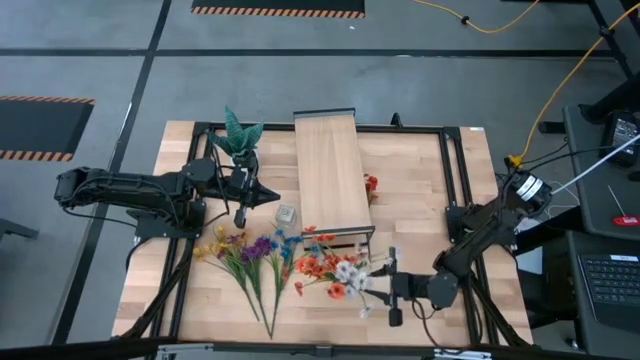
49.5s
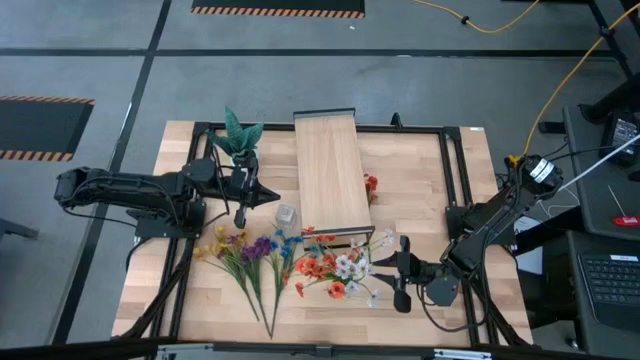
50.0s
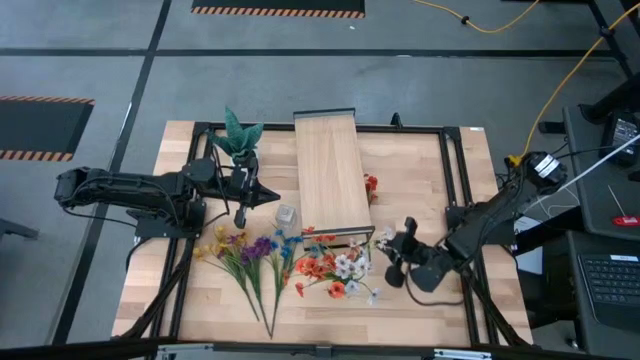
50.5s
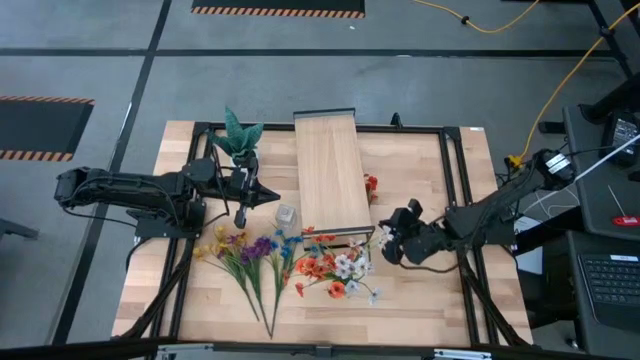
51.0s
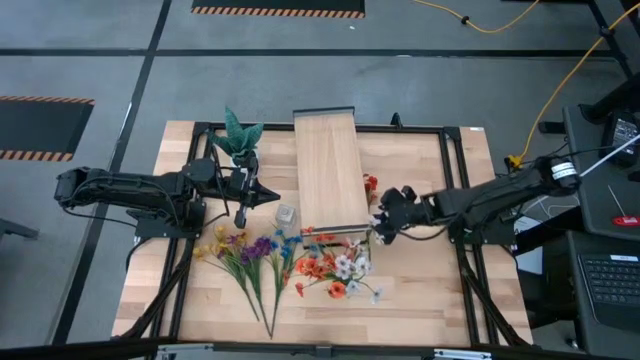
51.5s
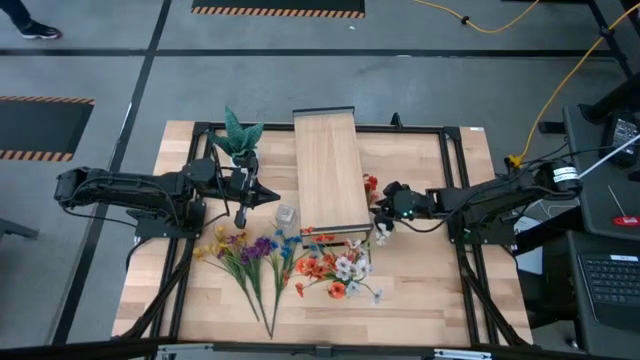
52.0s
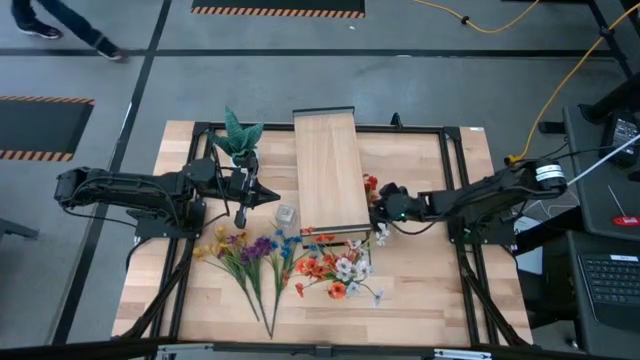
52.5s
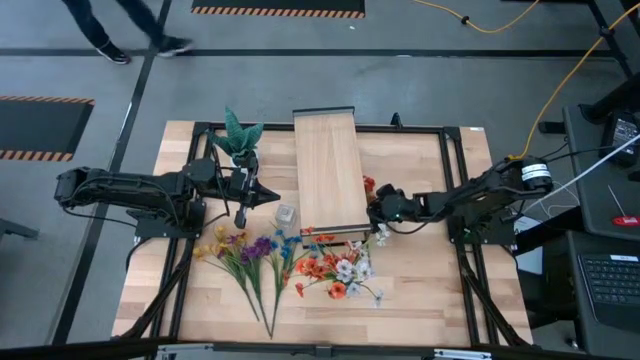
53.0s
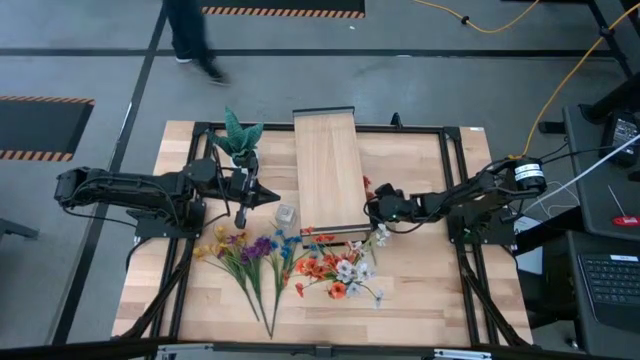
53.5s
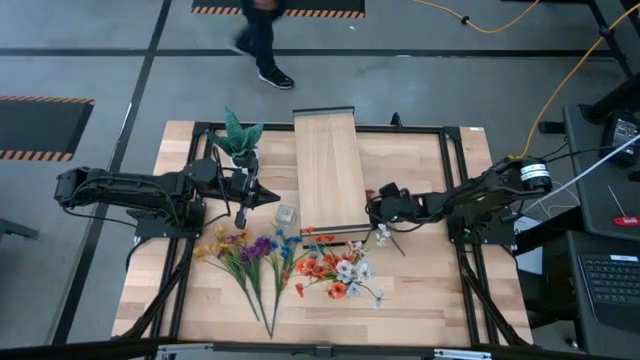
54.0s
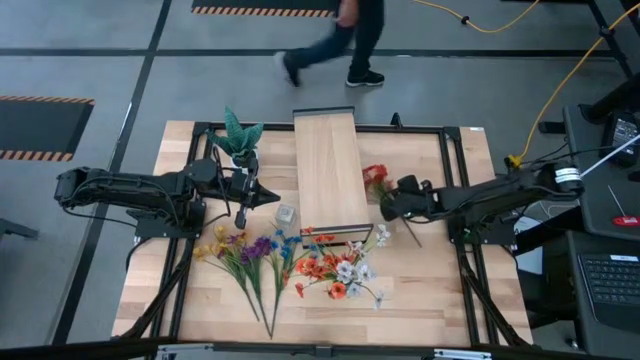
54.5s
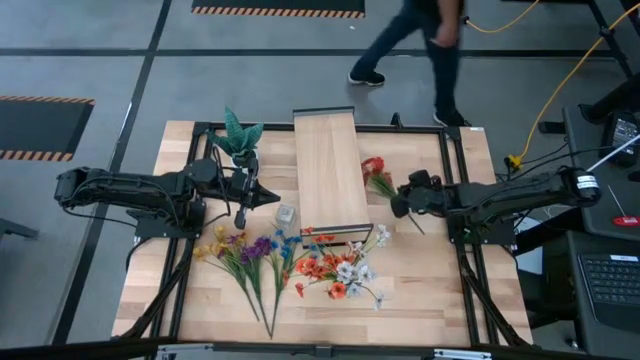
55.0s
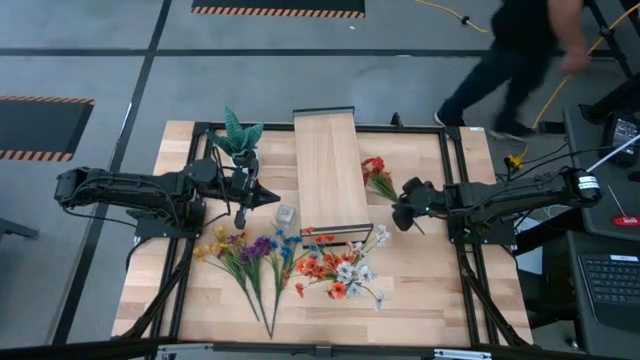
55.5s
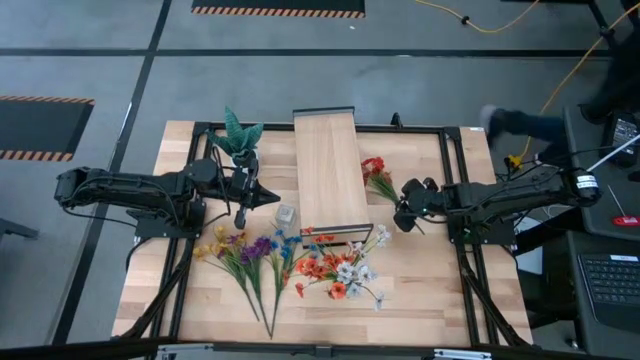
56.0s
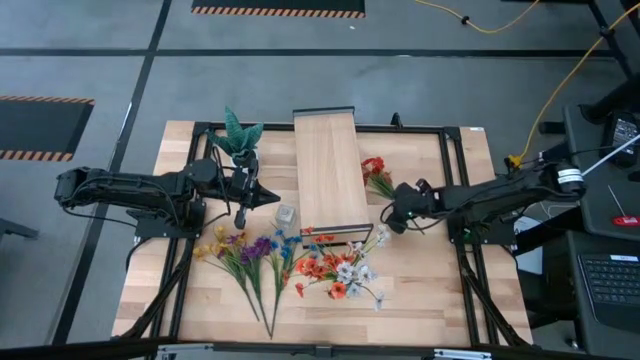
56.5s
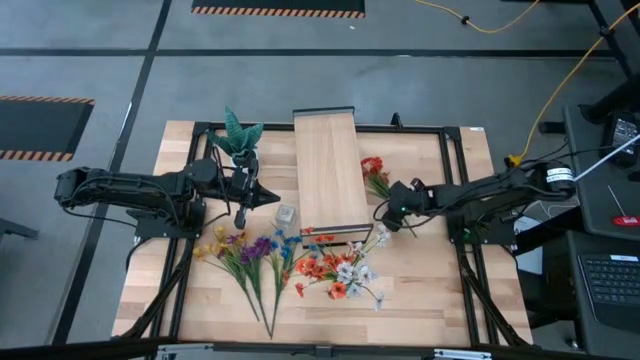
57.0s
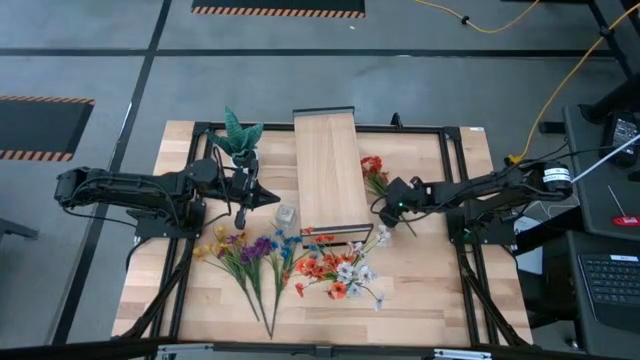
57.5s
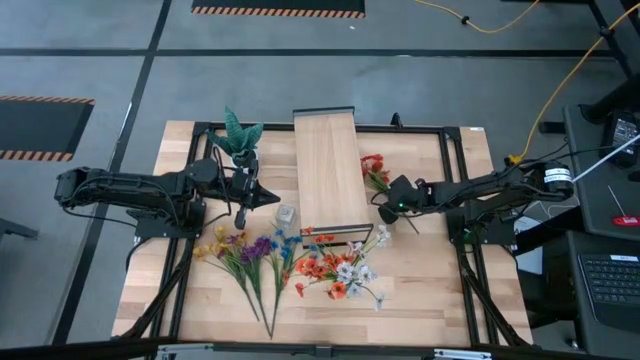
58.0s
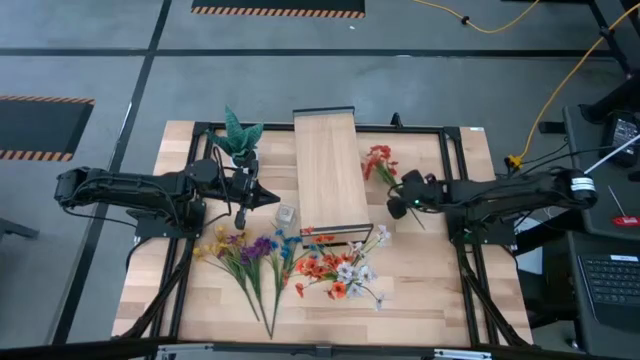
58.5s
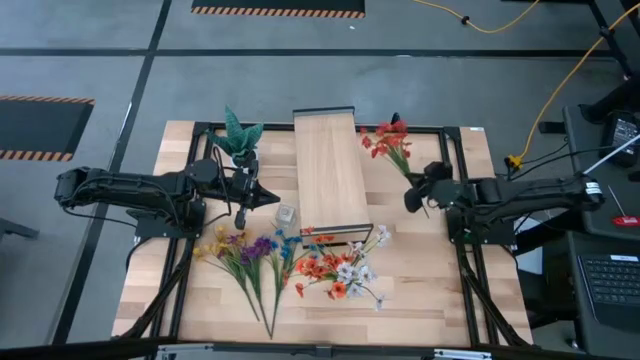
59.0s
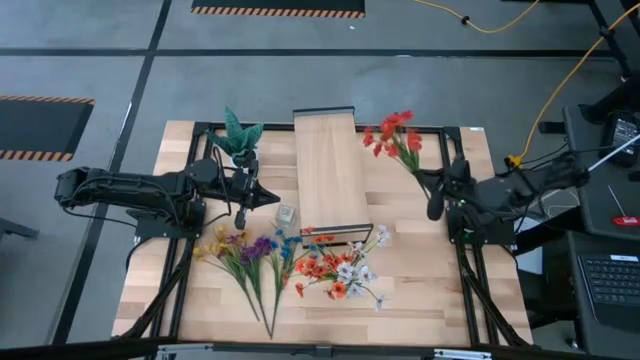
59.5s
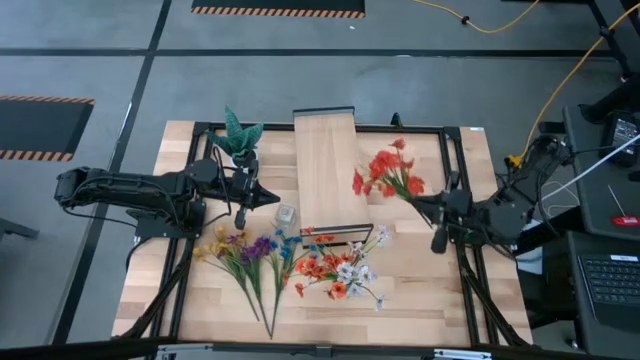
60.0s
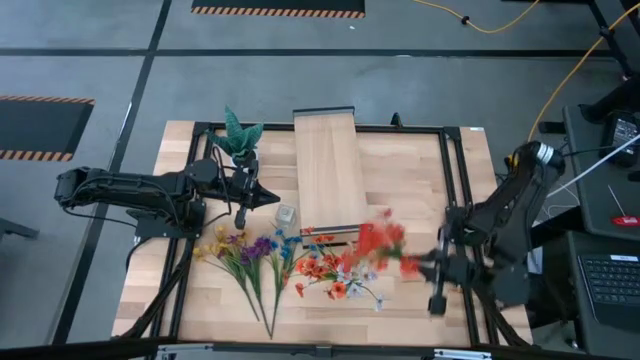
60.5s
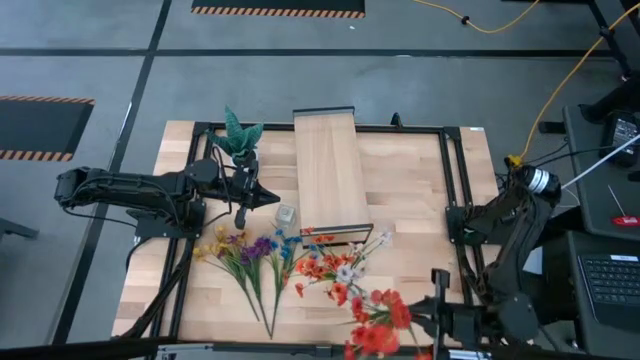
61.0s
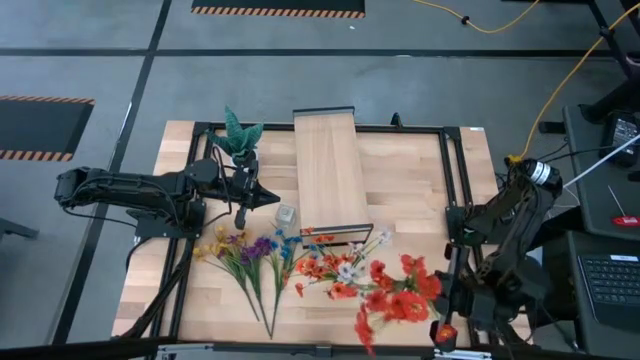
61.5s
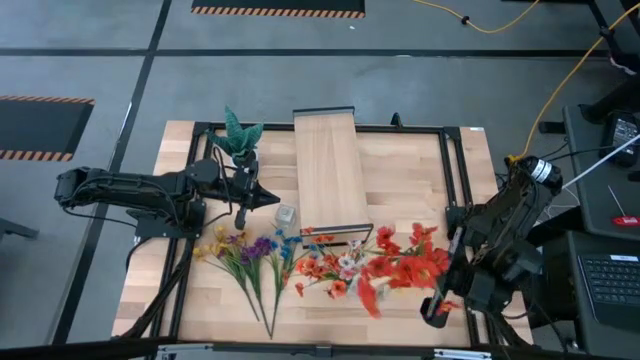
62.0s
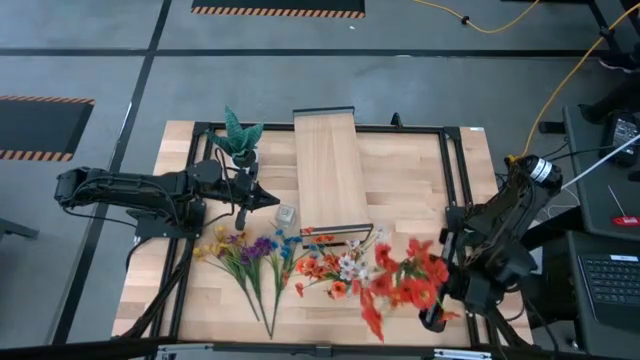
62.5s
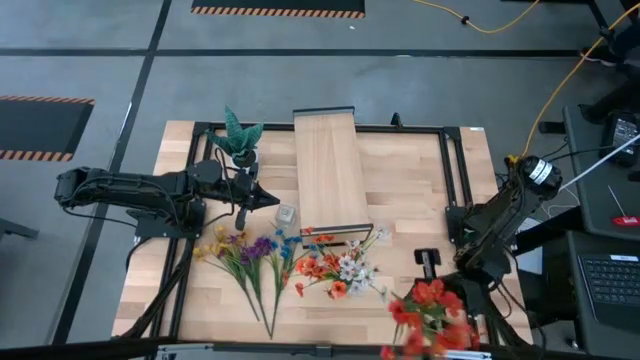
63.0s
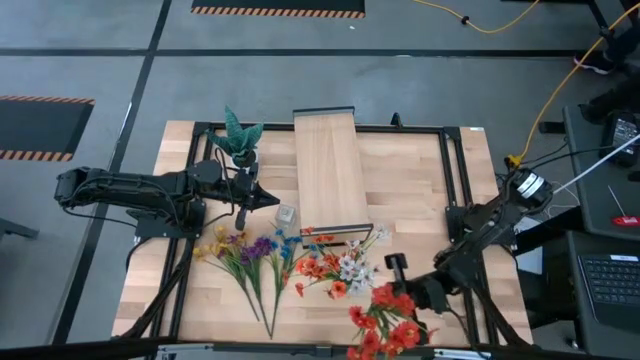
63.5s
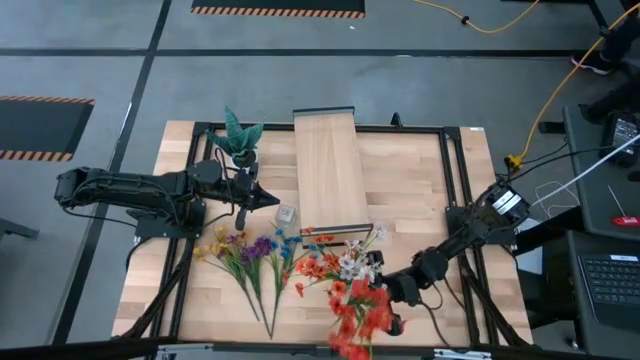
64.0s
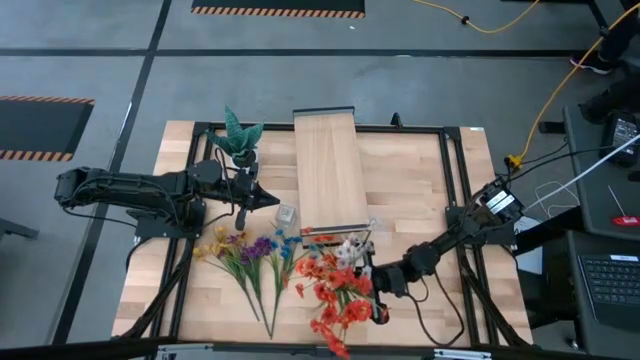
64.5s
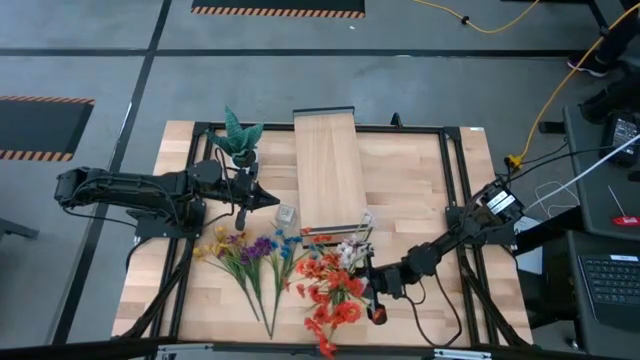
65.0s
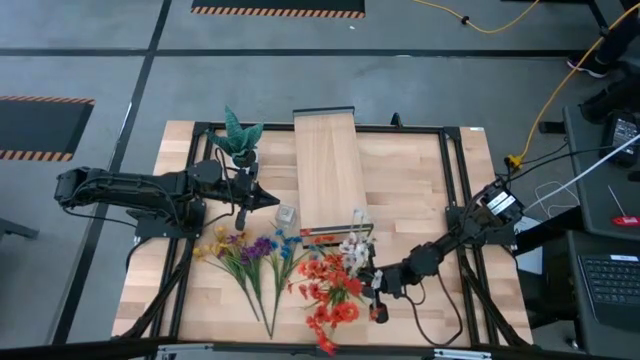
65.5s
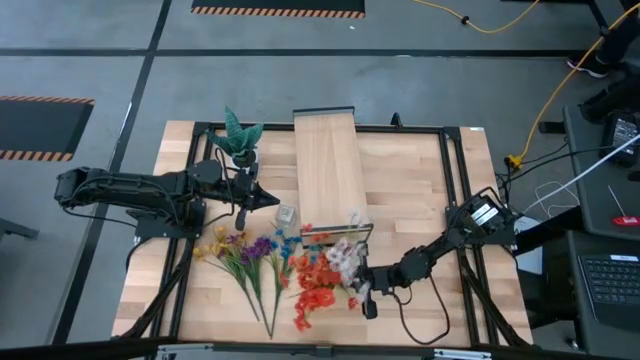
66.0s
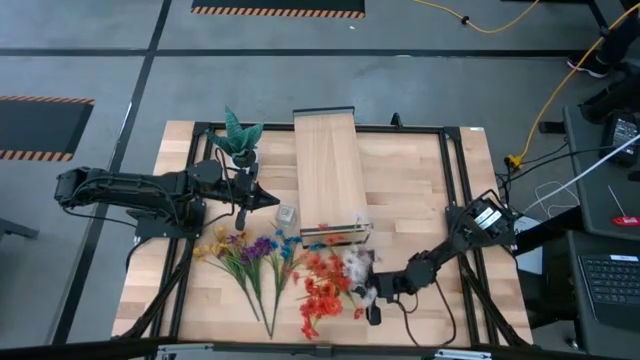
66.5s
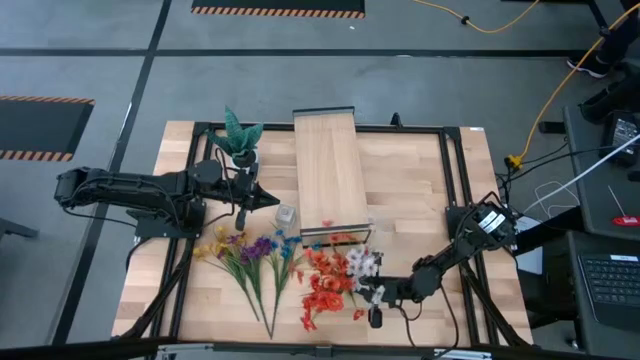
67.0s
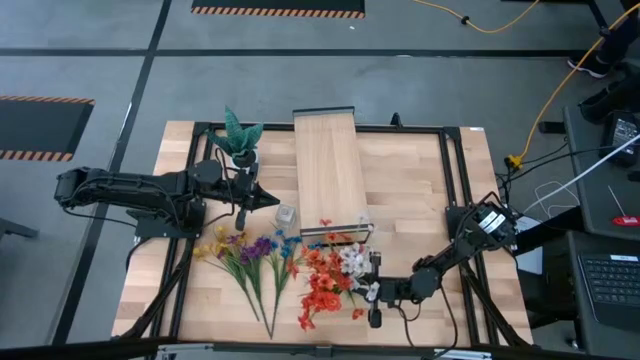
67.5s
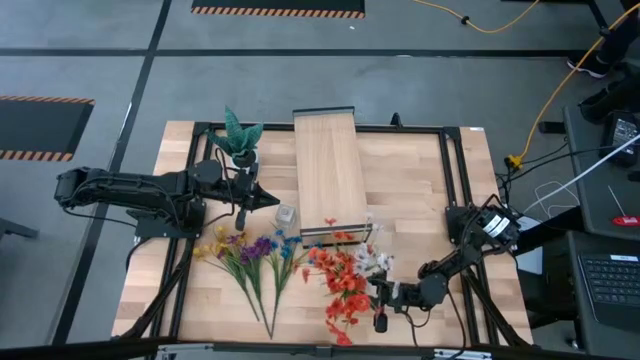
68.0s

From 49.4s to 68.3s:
Task: Pick and place flowers into a vace then onto a shelf
Put the orange flowers into the green vase

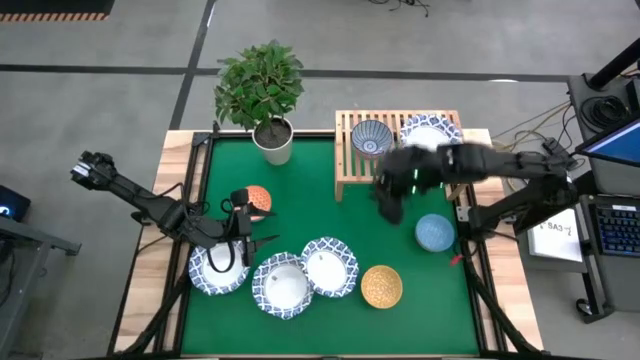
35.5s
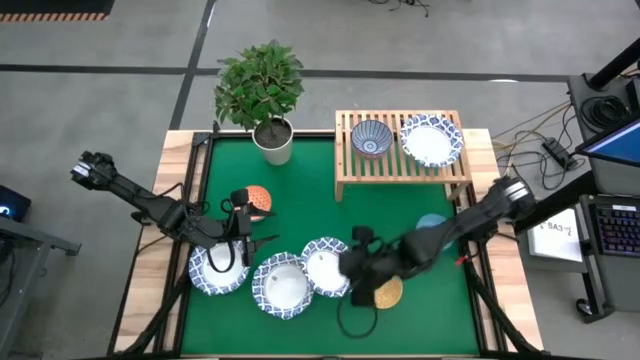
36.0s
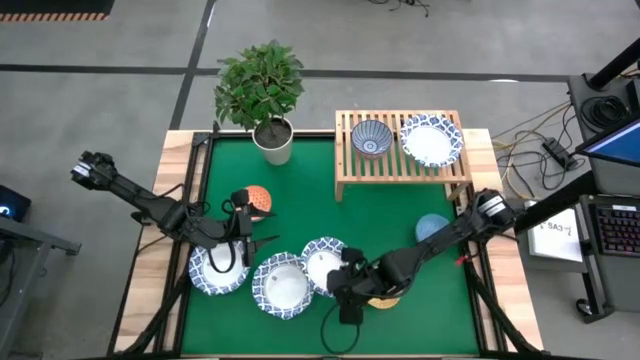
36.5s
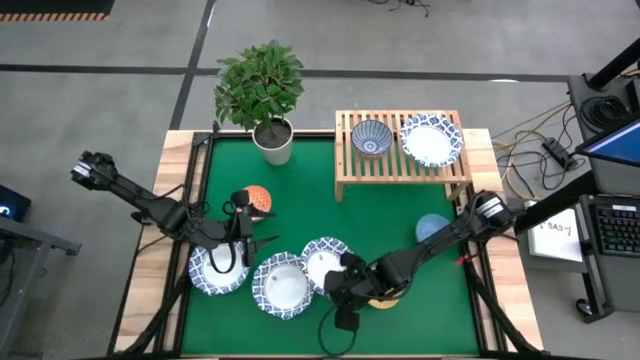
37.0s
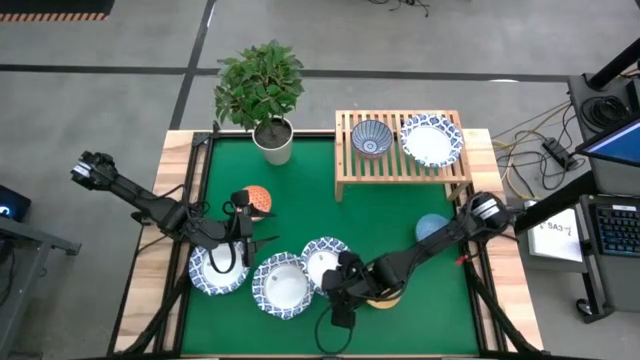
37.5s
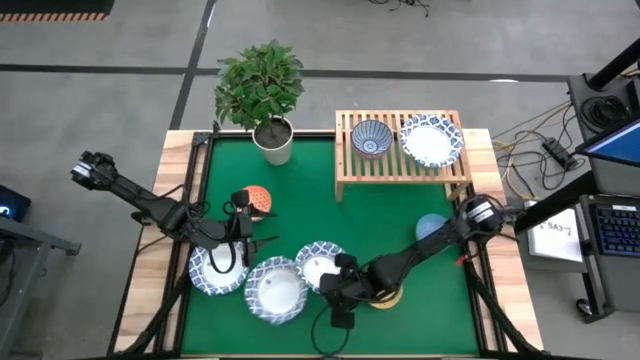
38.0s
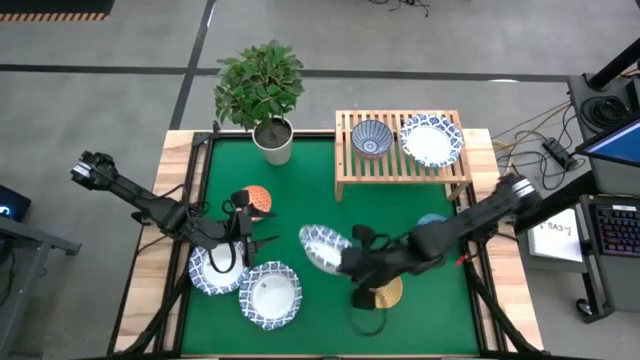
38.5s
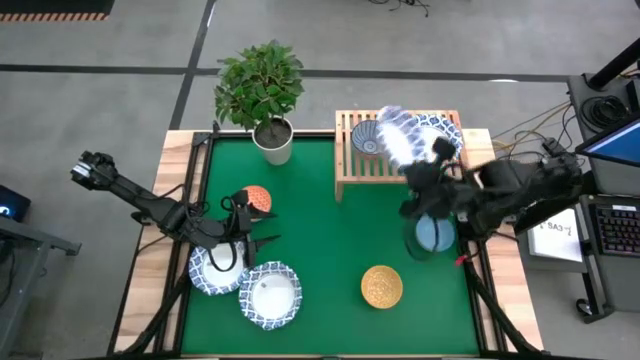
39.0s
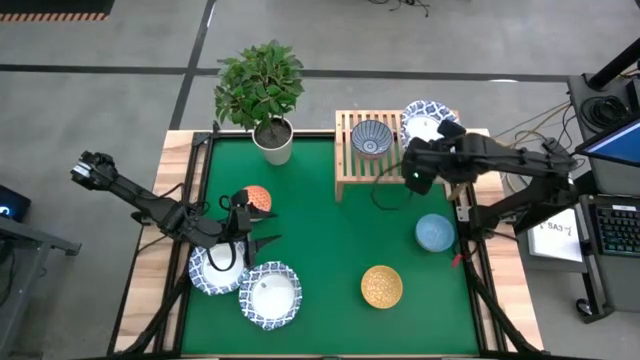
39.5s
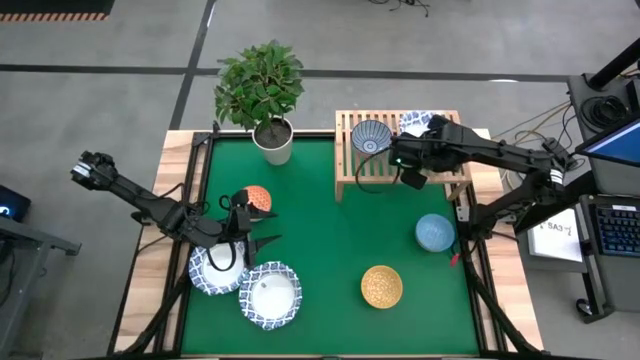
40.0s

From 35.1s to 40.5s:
Task: Place and stack bowls onto a shelf
Stack the white patterned bowl on top of the white patterned bowl on the shelf
